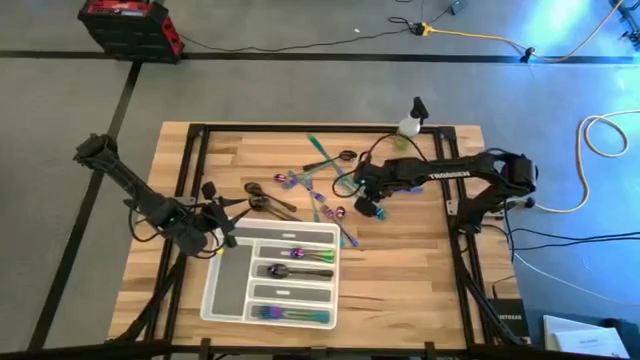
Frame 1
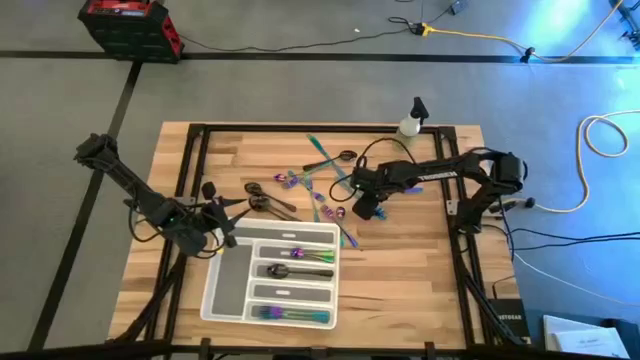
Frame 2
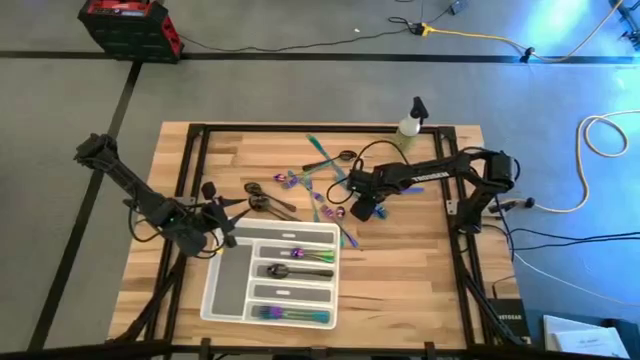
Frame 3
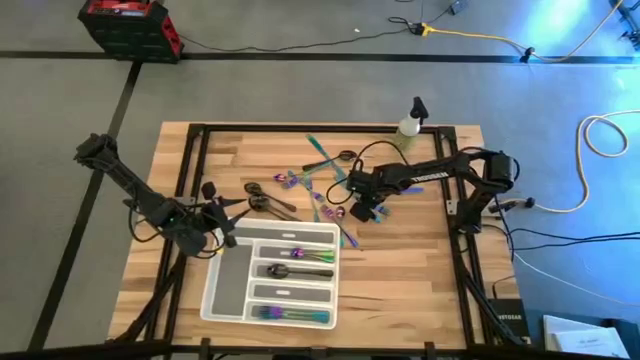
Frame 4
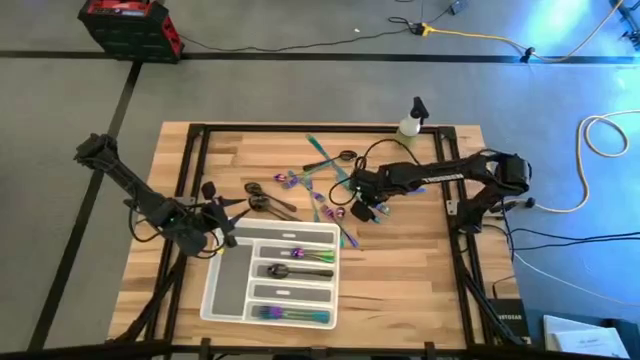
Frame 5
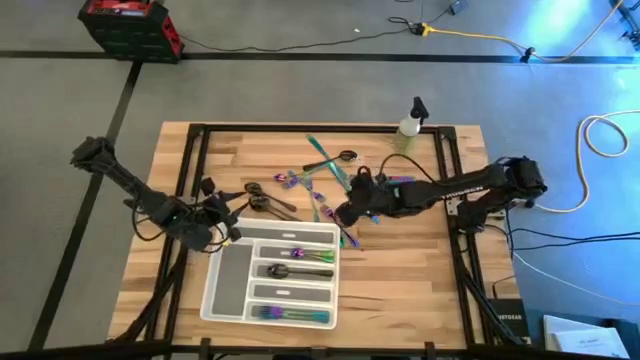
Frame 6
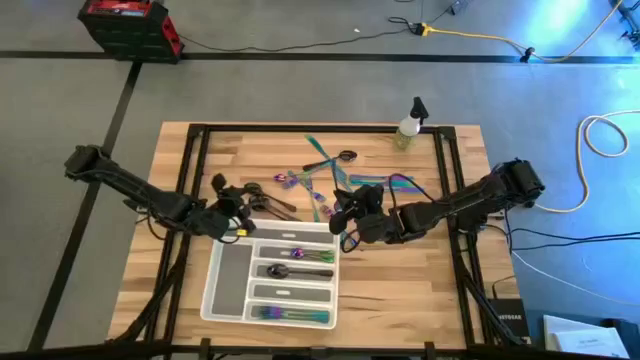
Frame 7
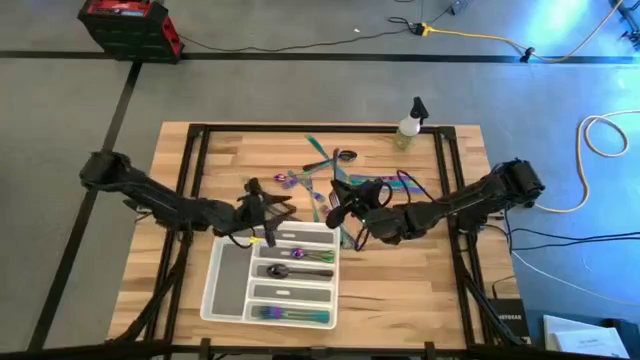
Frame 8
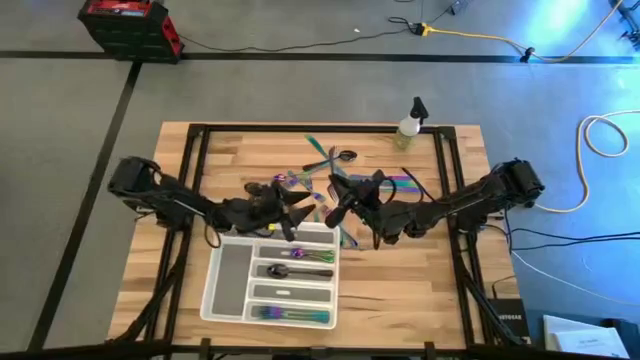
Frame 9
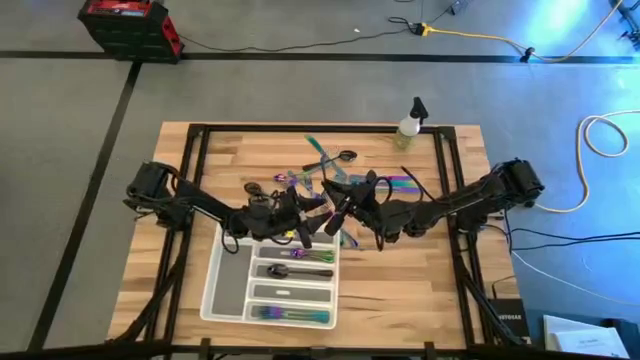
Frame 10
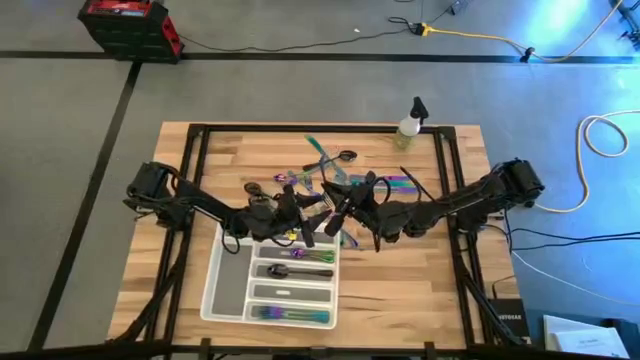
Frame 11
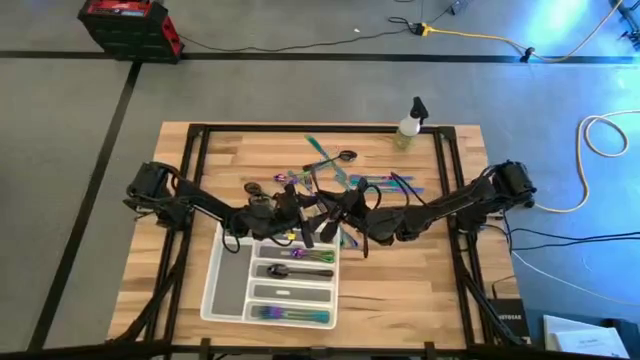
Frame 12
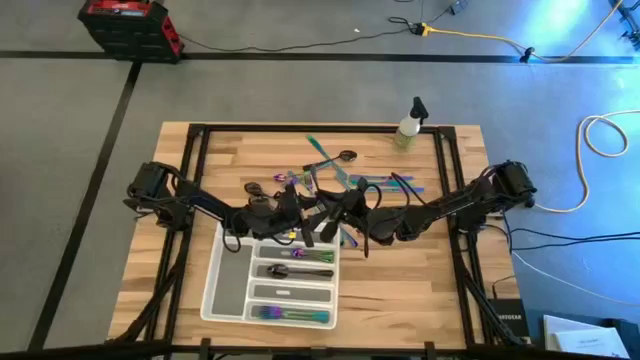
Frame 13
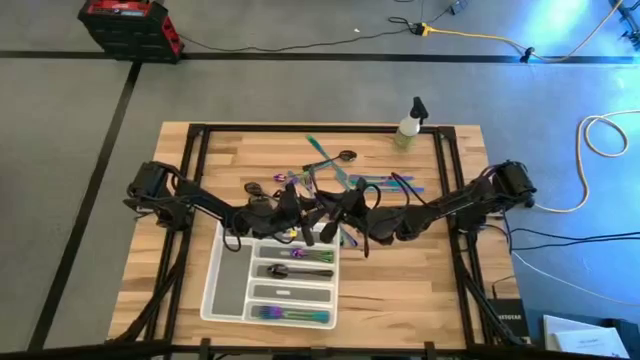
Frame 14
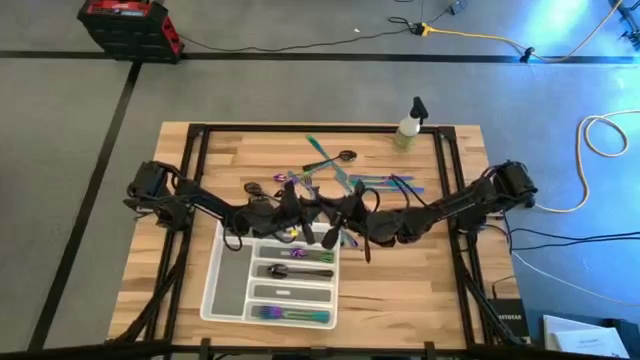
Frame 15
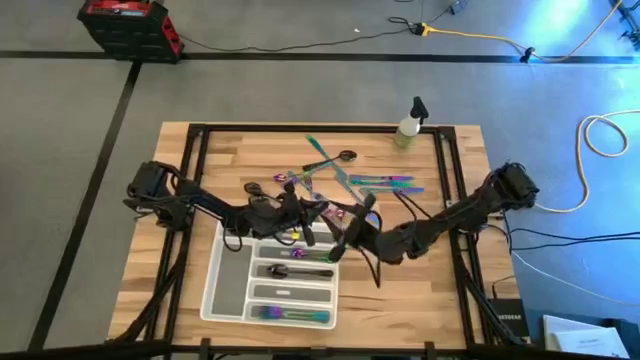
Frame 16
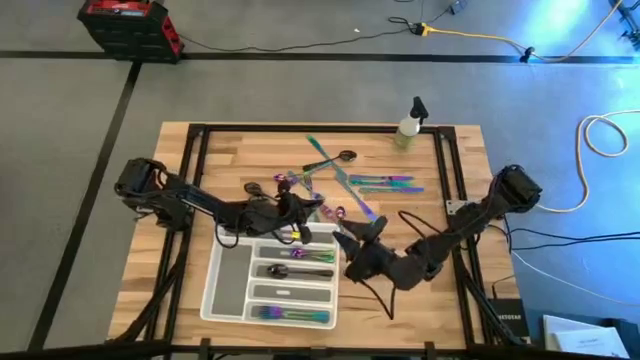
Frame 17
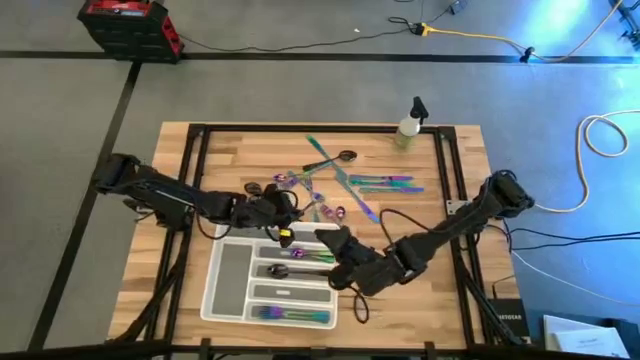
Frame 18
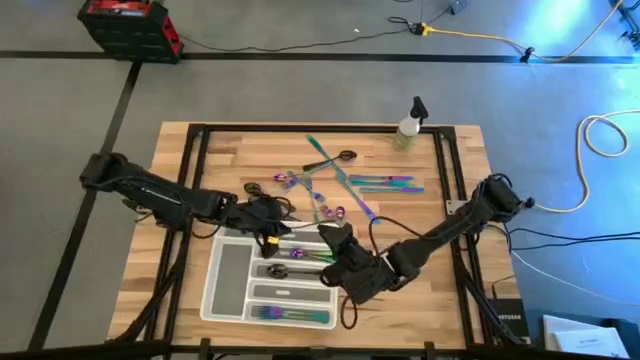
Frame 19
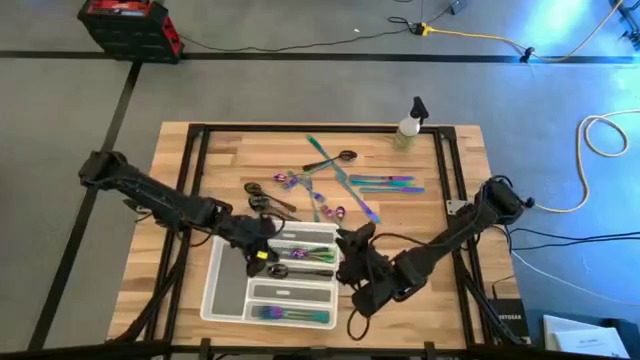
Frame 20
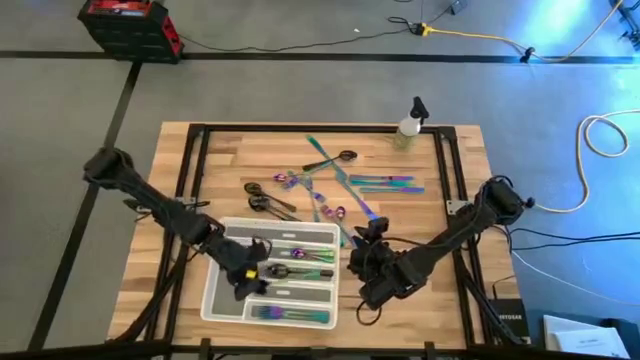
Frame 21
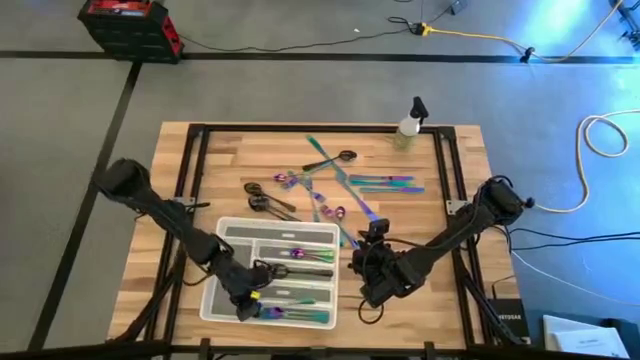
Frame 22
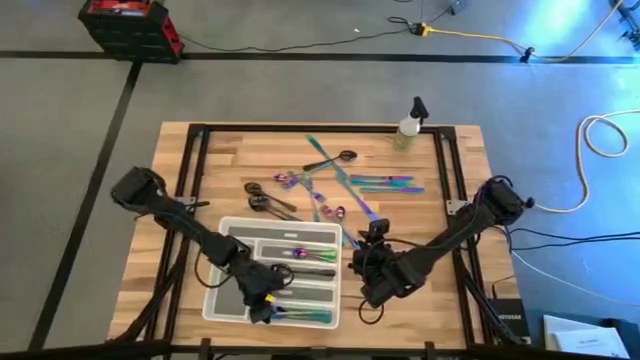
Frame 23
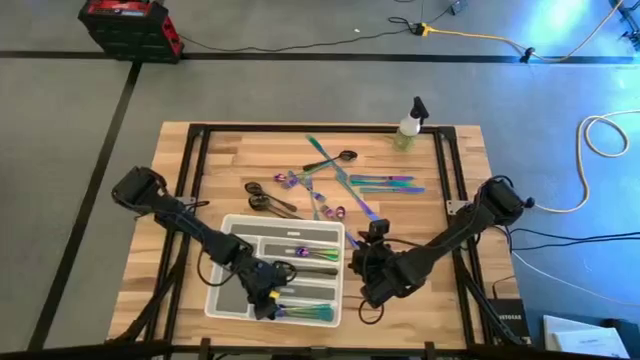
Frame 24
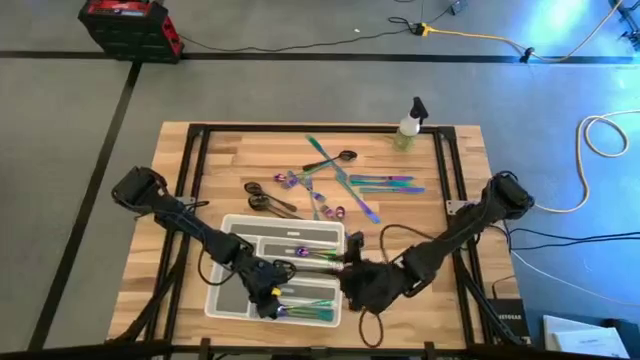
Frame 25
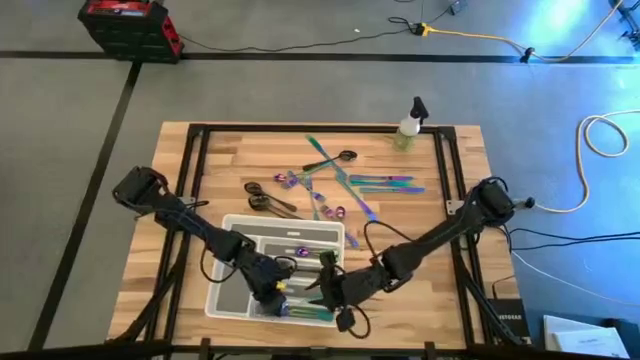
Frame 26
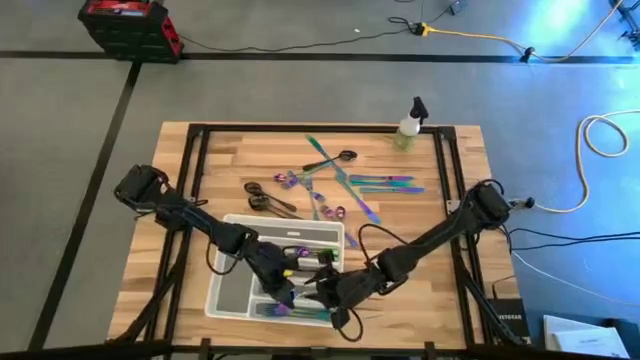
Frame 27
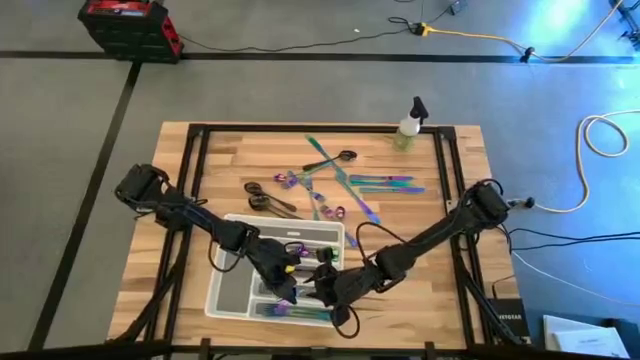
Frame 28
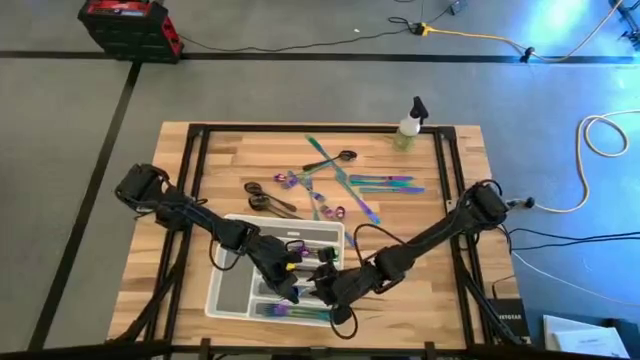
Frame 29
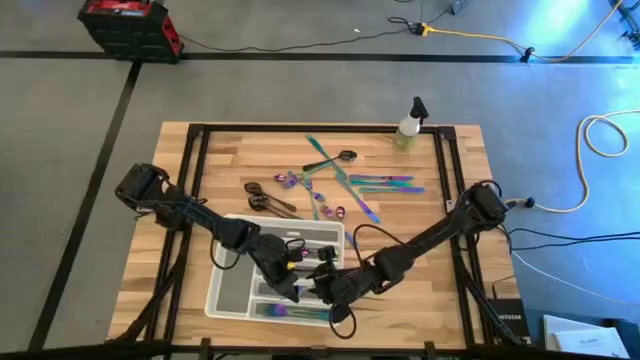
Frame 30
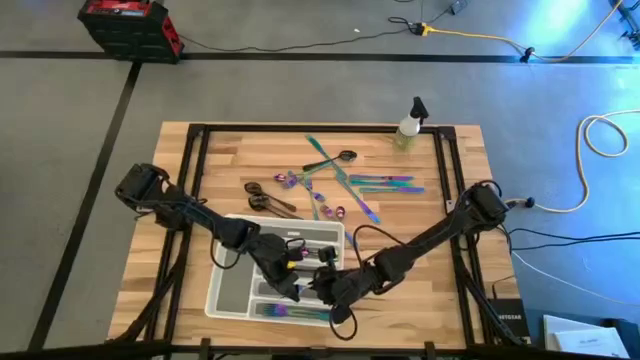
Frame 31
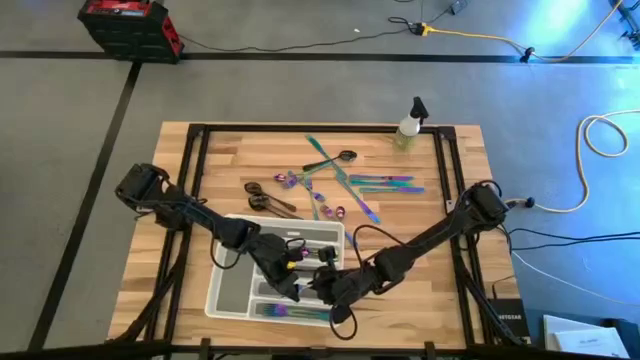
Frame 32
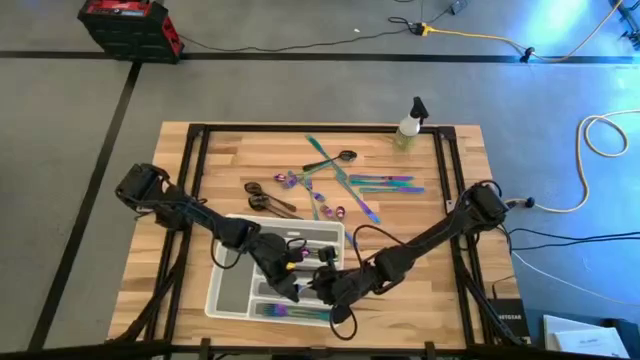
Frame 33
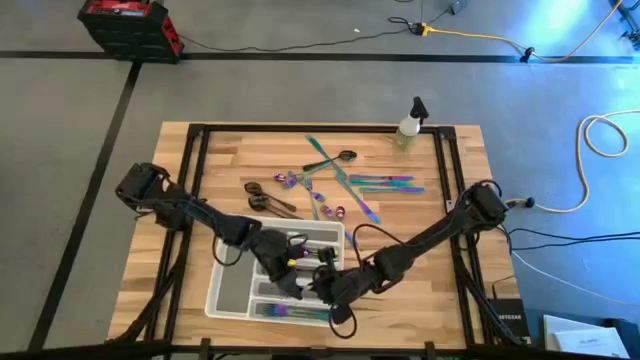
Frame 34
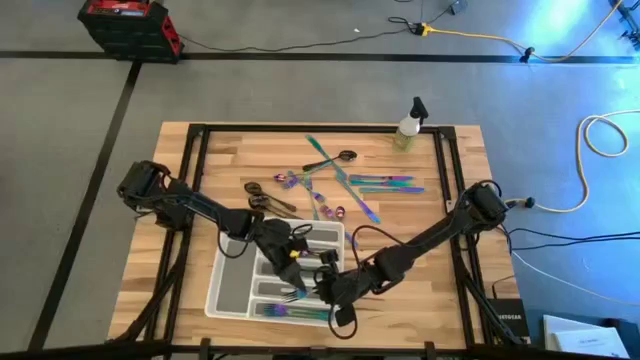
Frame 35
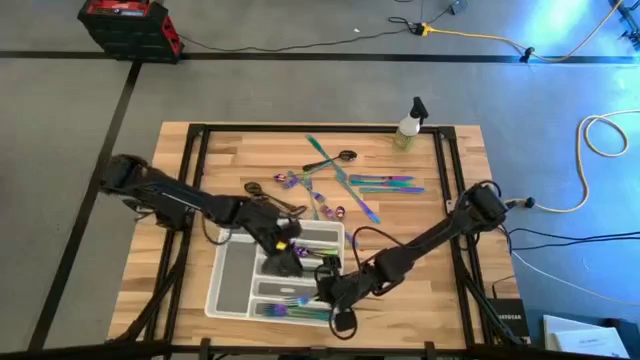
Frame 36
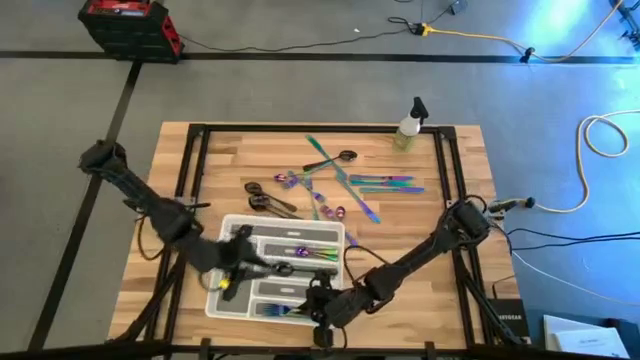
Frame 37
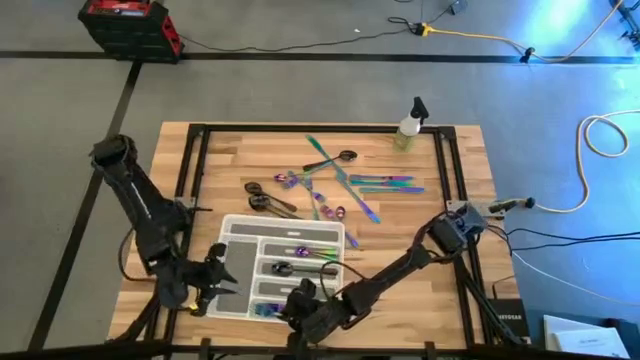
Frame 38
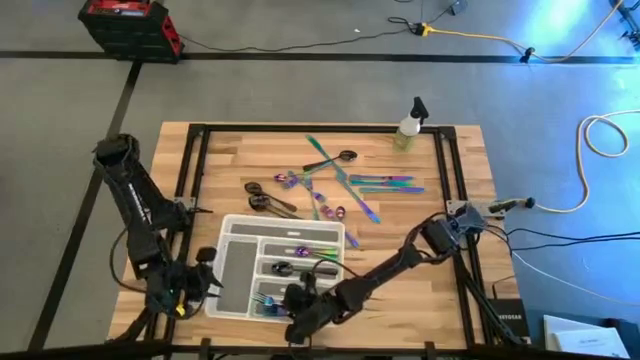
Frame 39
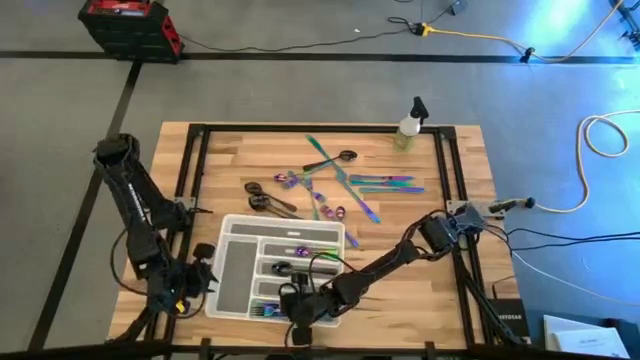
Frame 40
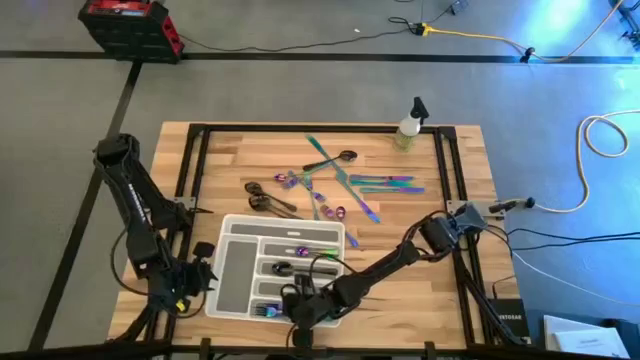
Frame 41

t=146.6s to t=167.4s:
Task: Sort silverware
Put the blue fork into the white silverware tray

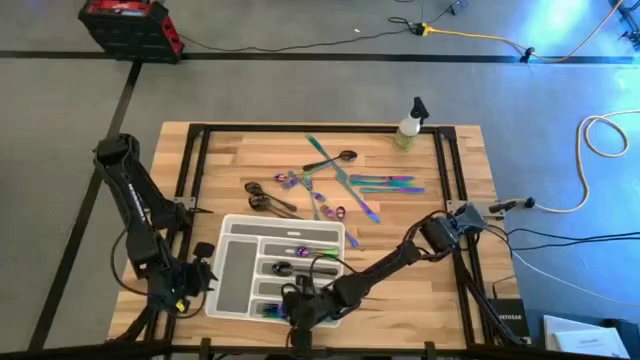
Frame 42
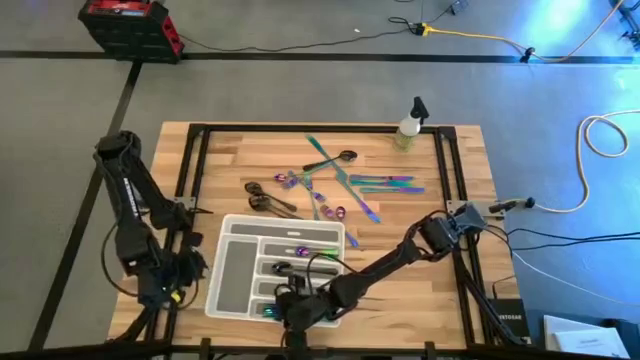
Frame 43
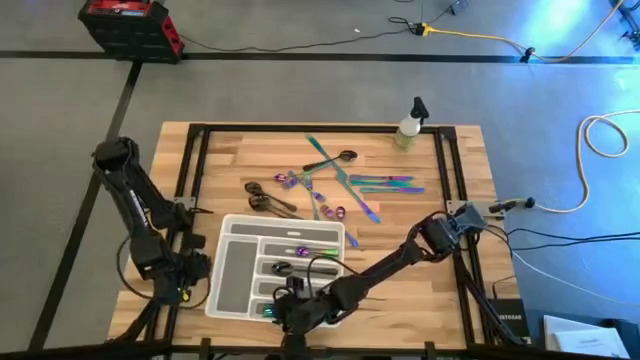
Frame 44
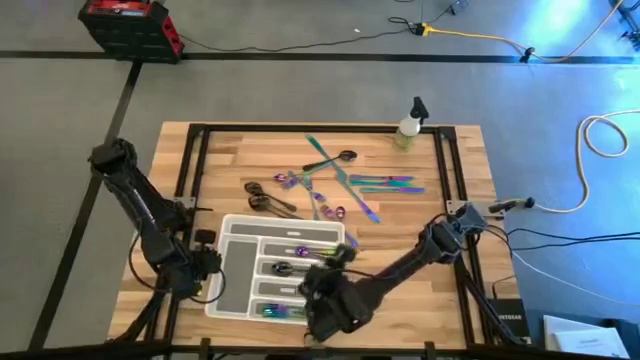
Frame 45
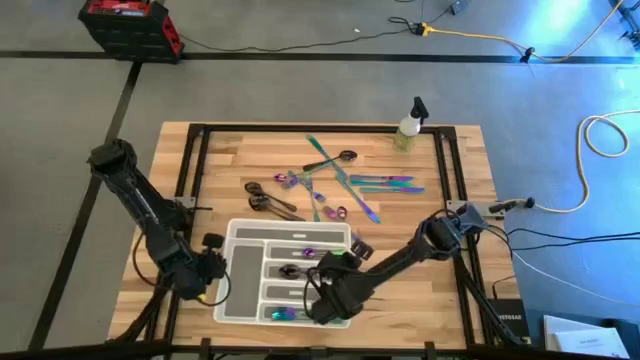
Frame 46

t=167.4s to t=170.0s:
Adjust the white silverware tray
